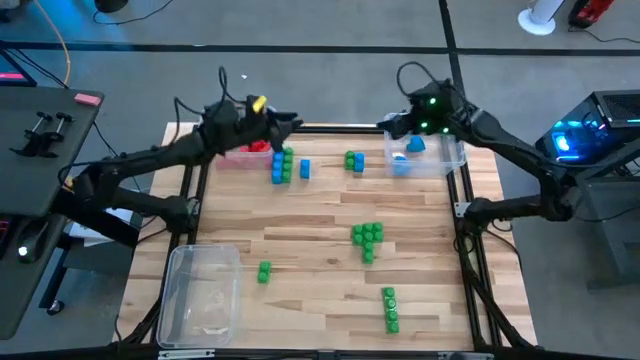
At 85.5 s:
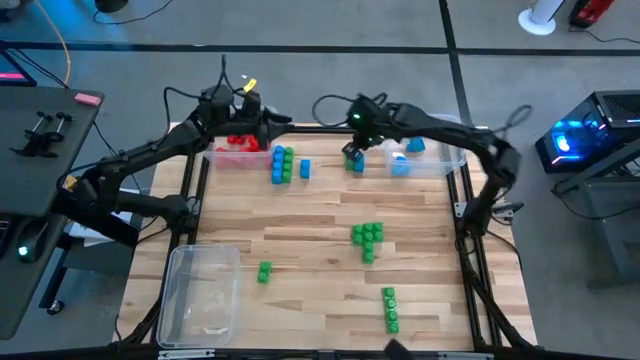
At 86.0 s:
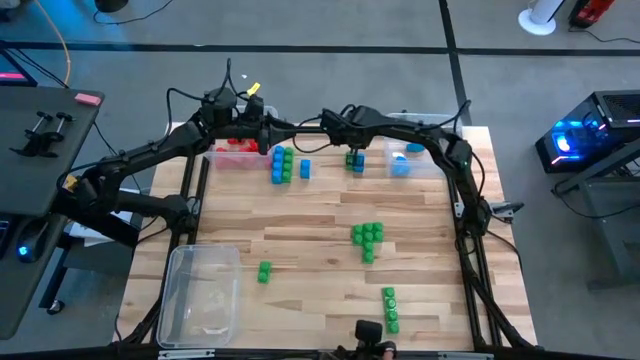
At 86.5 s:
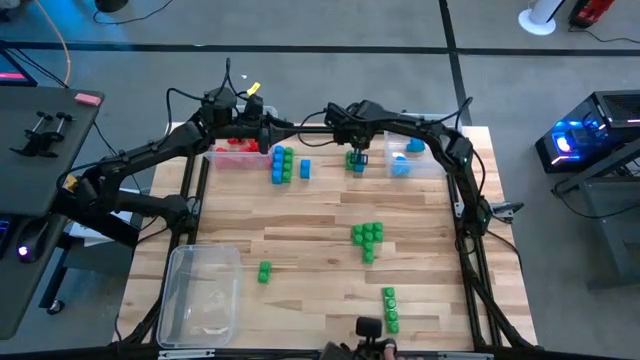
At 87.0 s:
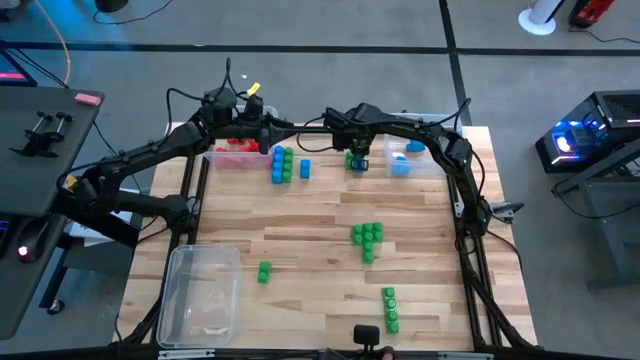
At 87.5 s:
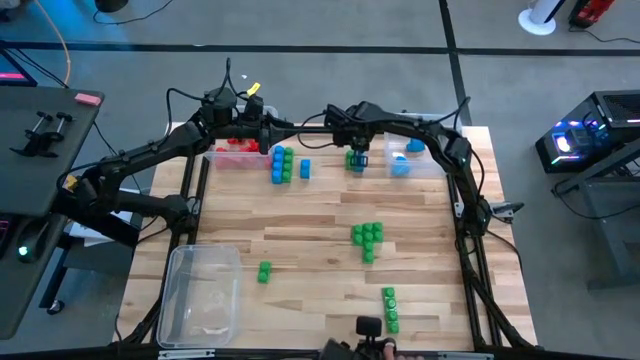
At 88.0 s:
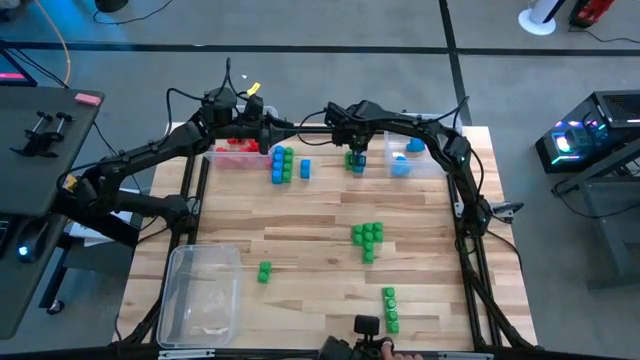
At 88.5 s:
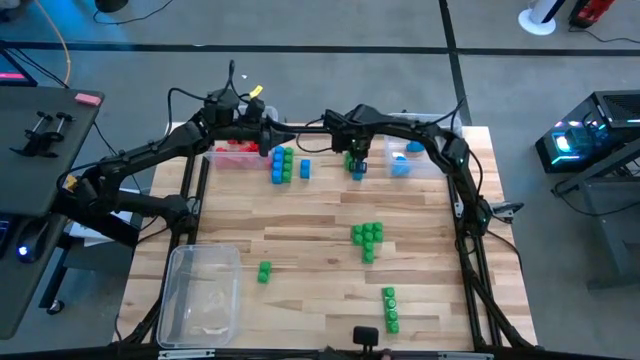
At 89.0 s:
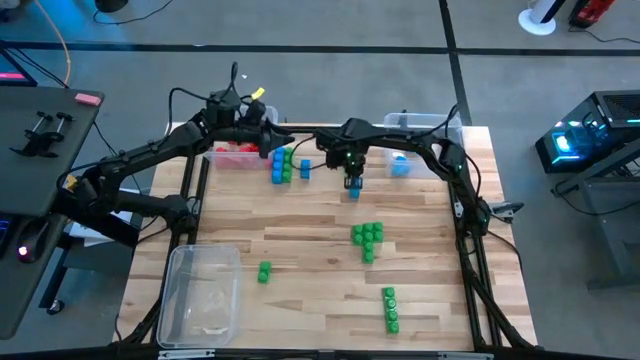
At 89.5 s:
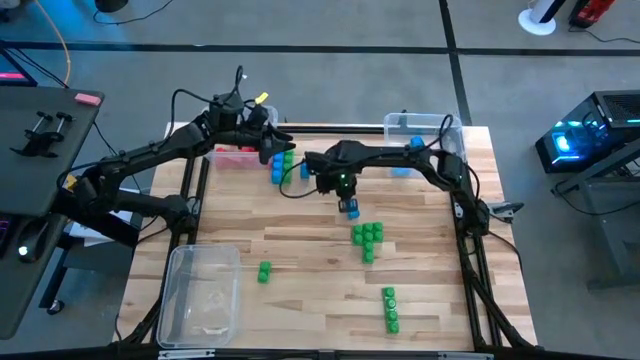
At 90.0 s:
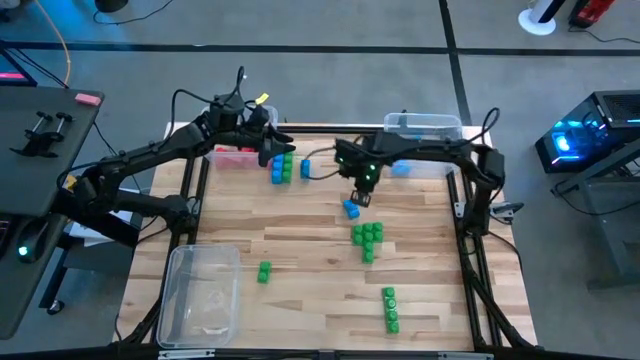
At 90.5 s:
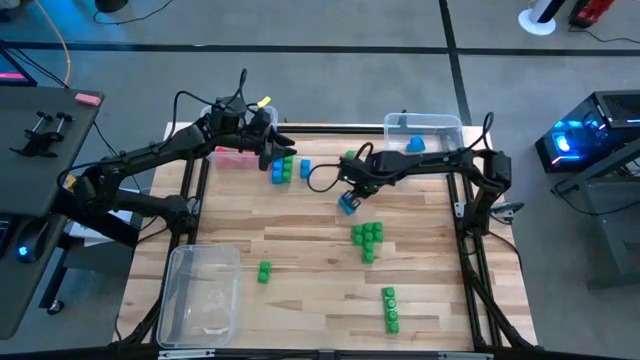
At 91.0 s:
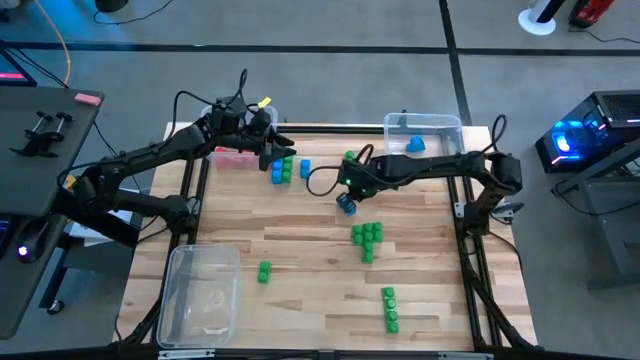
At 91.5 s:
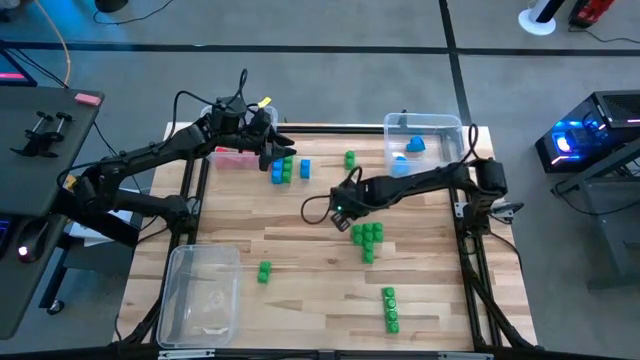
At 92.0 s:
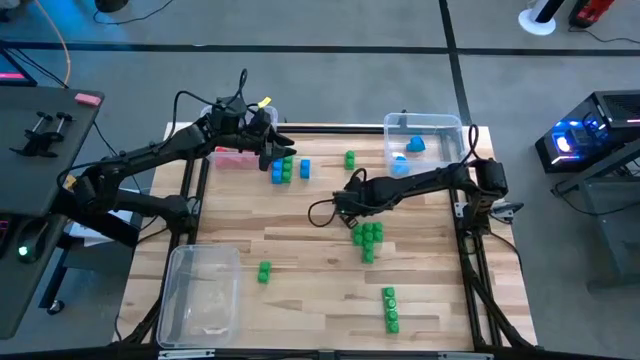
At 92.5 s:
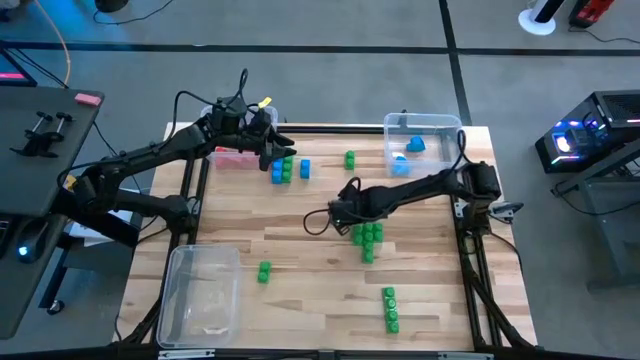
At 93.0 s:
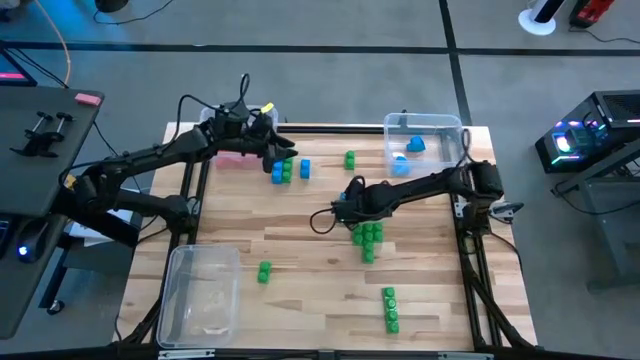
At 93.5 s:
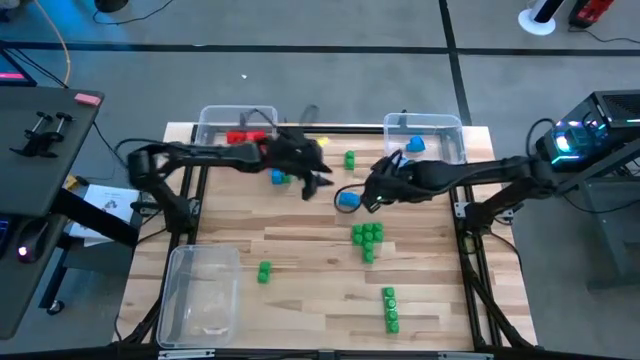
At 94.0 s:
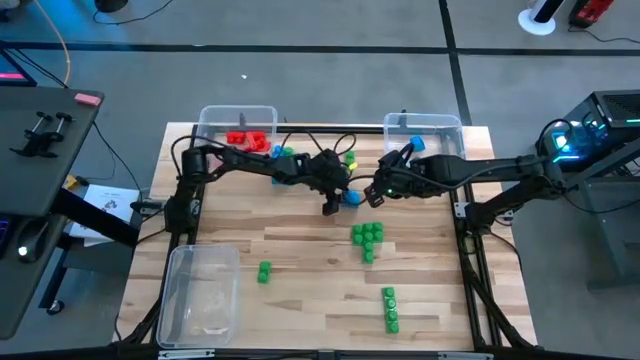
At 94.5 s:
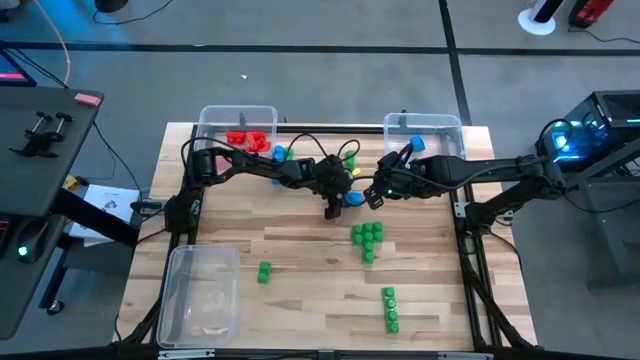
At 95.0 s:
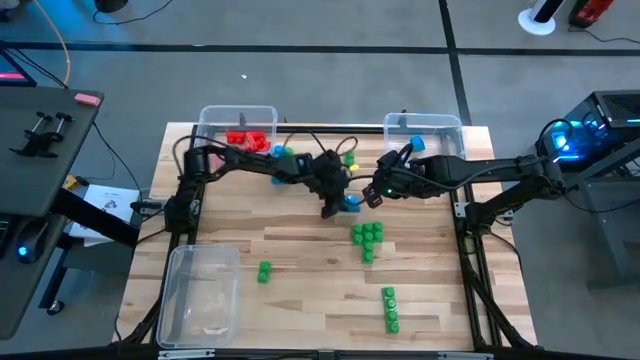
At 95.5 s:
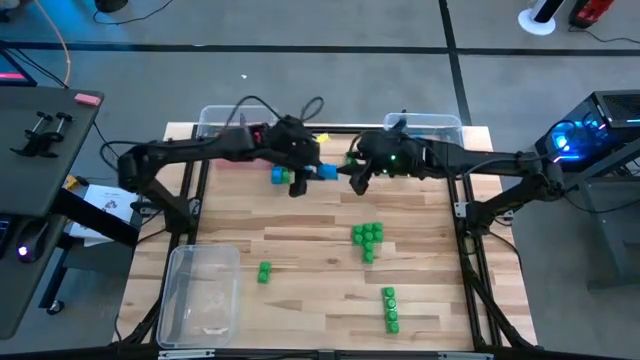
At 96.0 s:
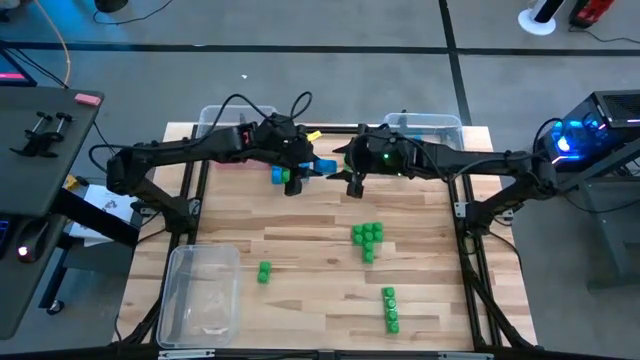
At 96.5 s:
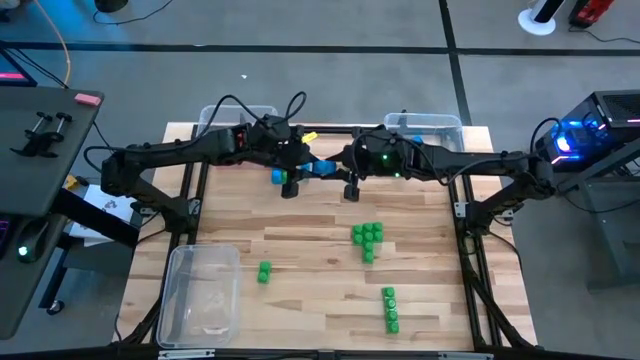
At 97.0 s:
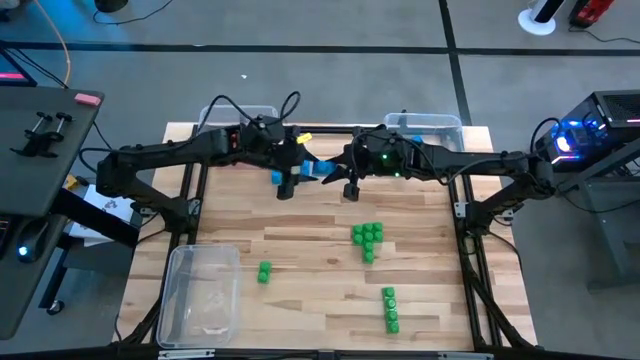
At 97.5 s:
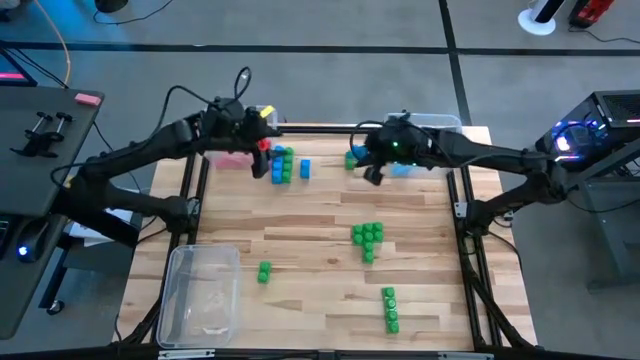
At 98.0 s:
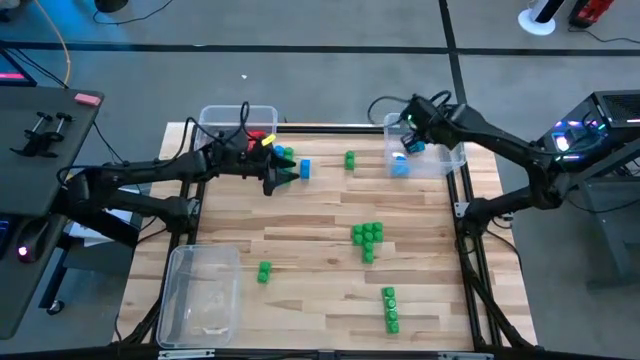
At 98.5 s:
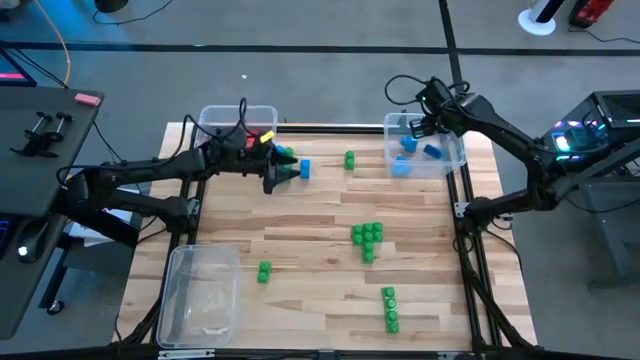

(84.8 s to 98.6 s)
Task: Sort blocks
Put the blue game piece into the top right transparent bin

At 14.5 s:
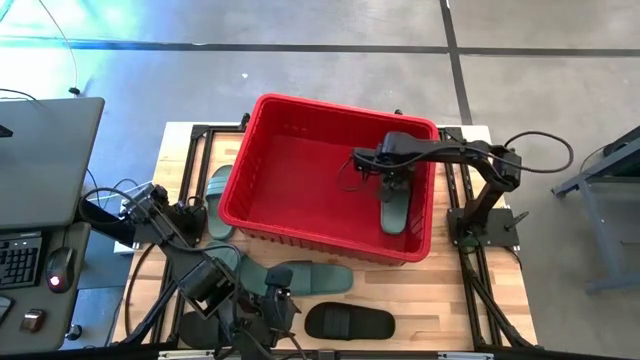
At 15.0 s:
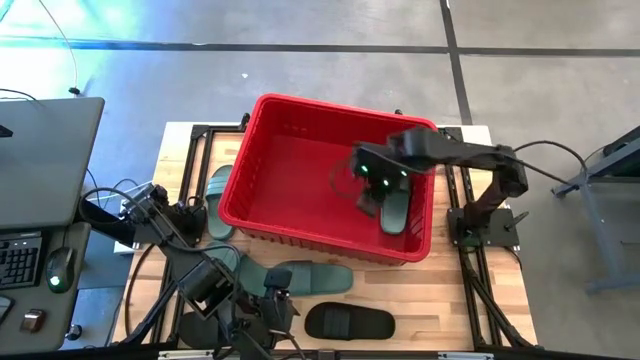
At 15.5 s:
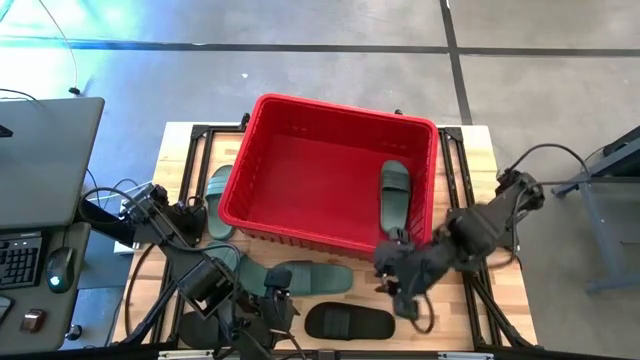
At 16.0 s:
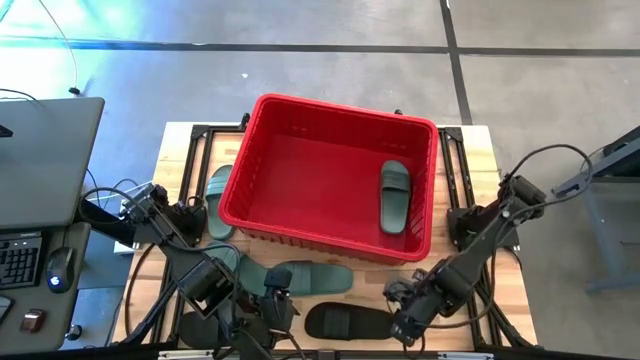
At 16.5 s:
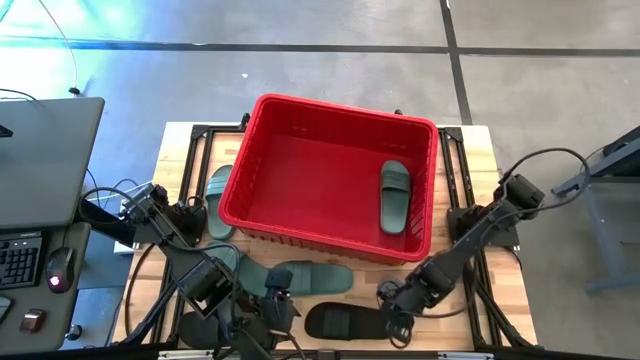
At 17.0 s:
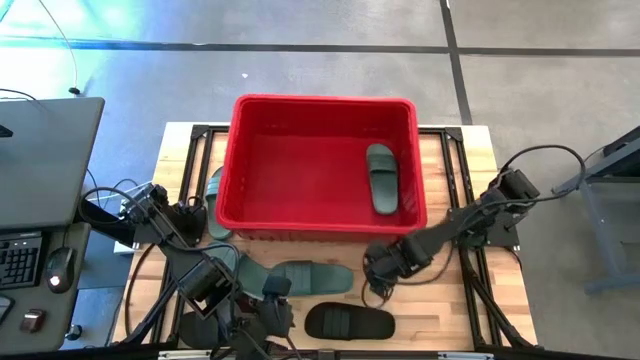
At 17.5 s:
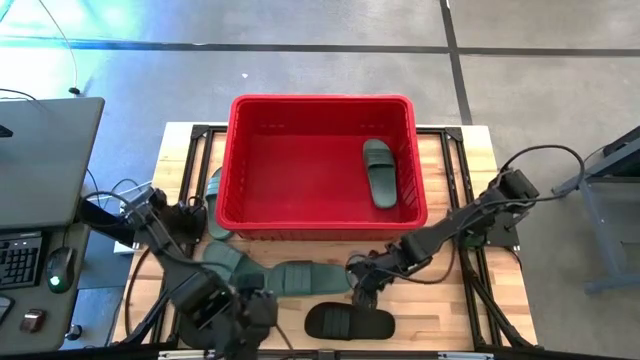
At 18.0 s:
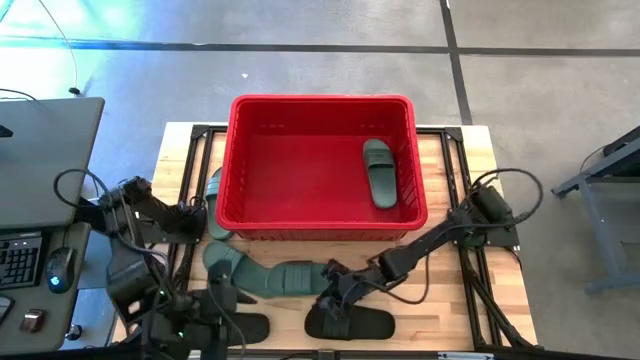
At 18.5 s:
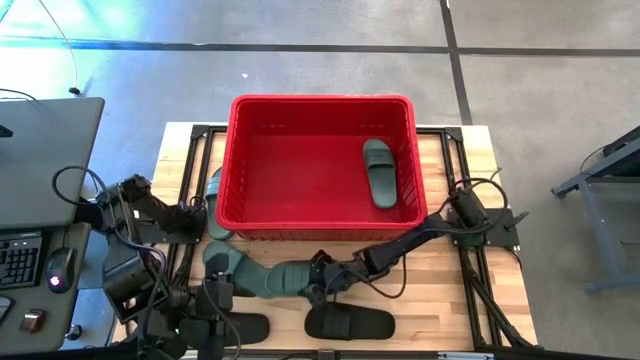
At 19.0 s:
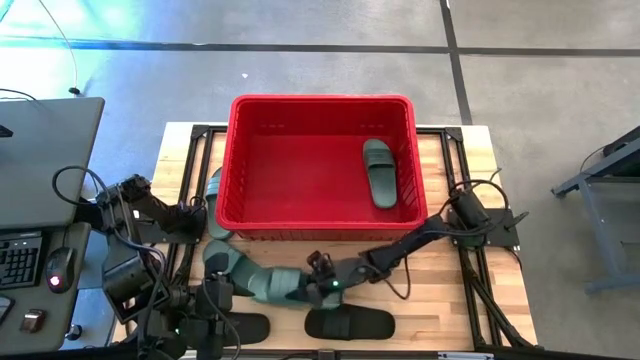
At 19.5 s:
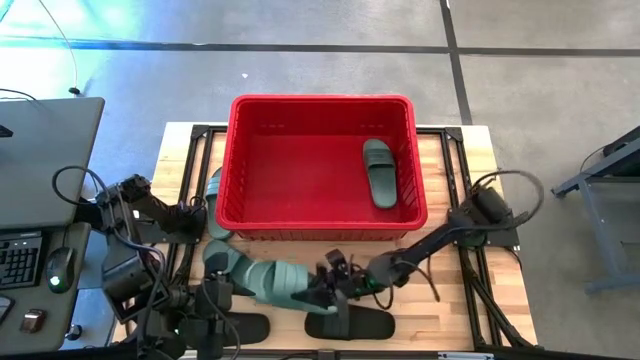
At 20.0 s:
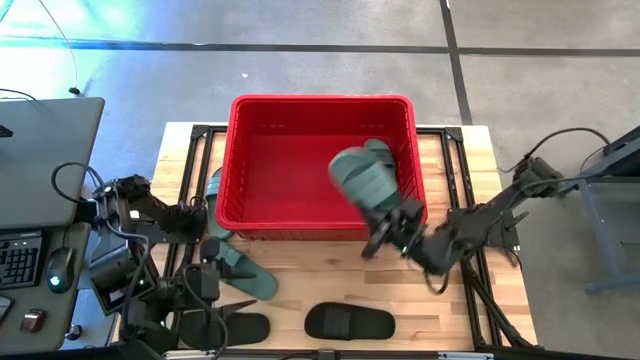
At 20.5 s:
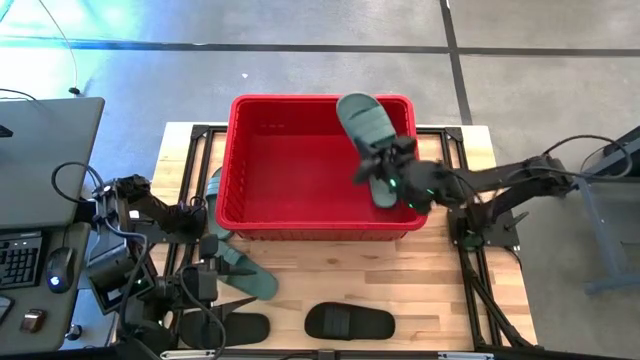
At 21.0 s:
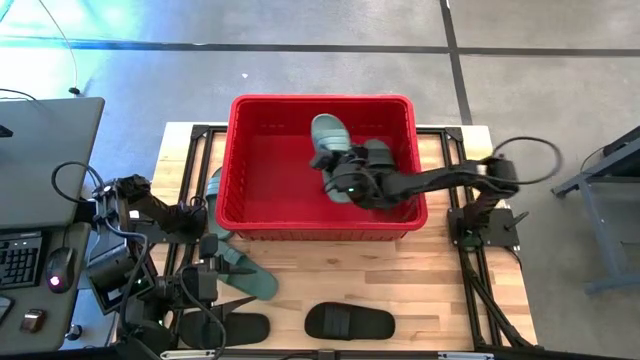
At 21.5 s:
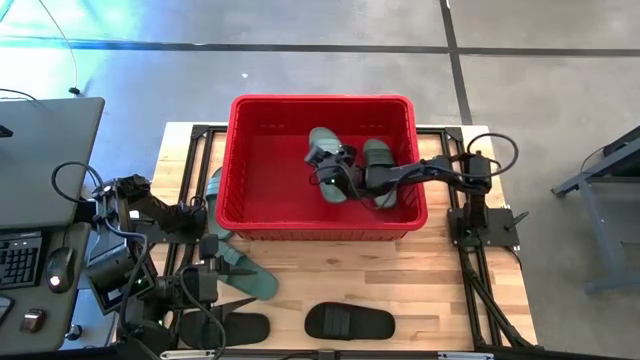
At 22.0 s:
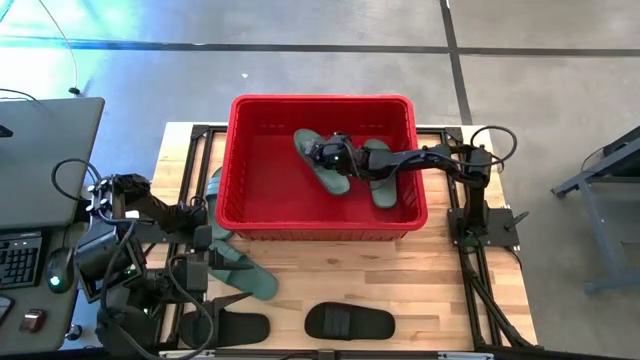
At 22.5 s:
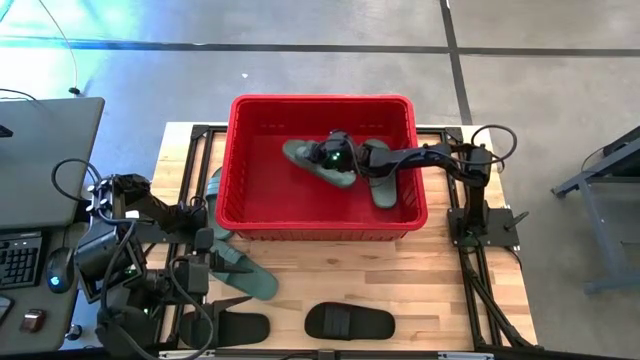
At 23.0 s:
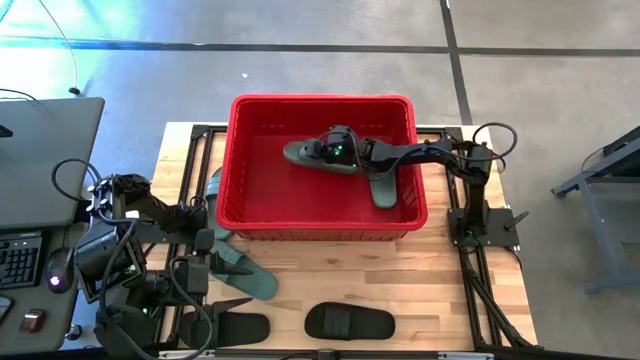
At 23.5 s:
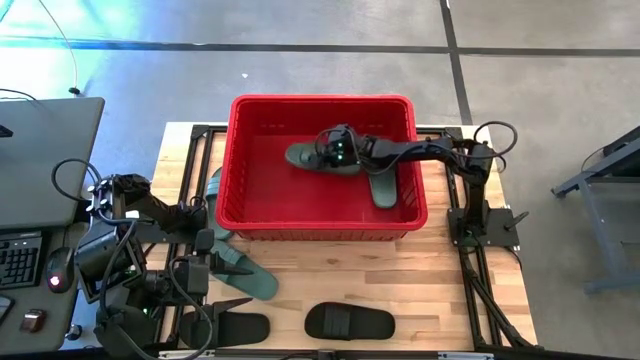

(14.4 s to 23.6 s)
Task: Pick and place slides into bin
Put the green slide into the red bin
